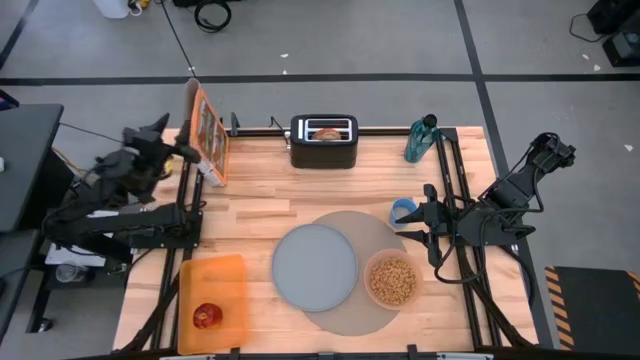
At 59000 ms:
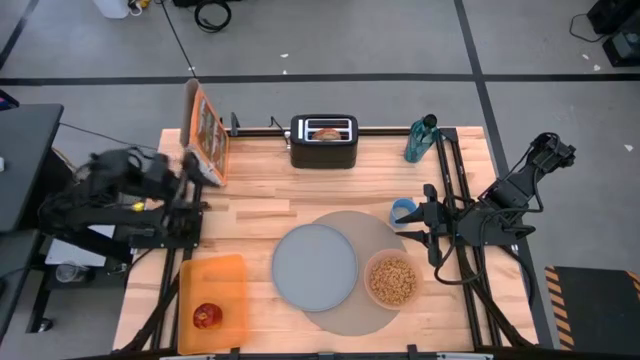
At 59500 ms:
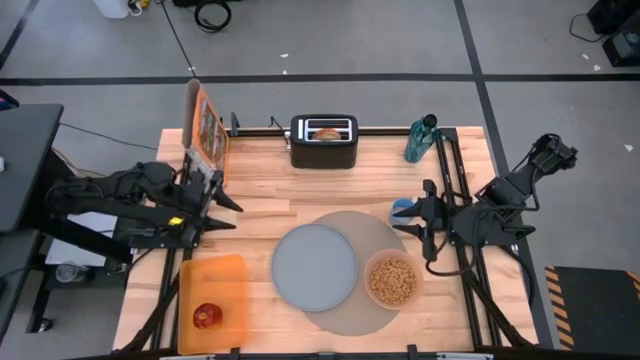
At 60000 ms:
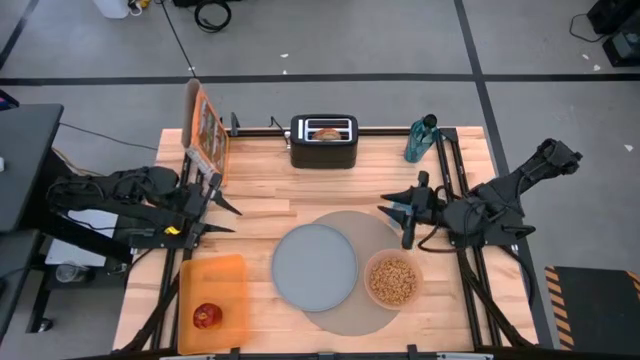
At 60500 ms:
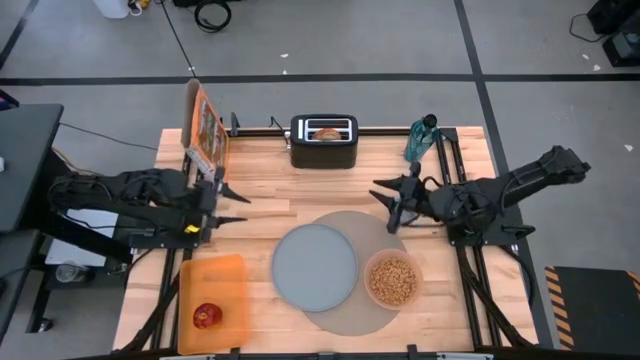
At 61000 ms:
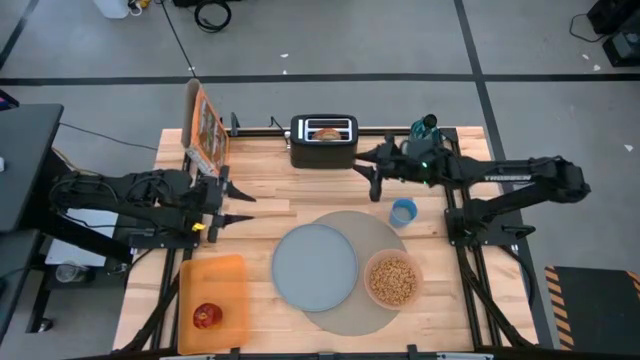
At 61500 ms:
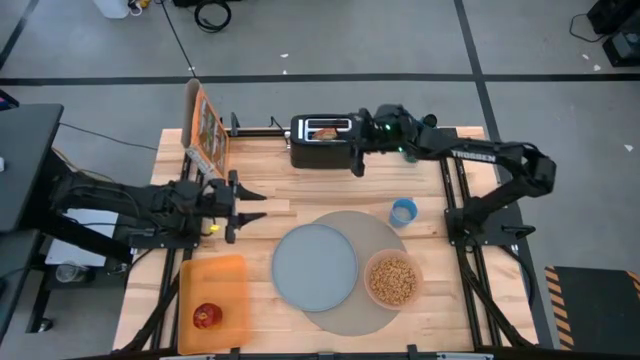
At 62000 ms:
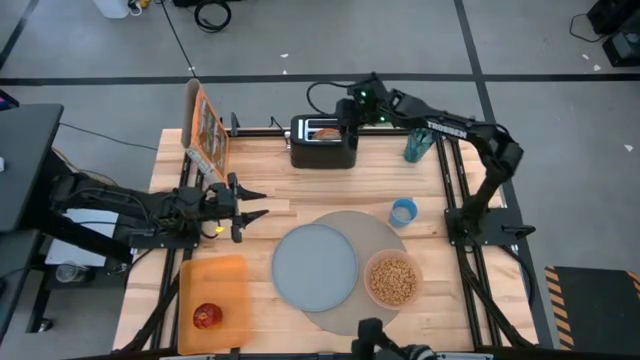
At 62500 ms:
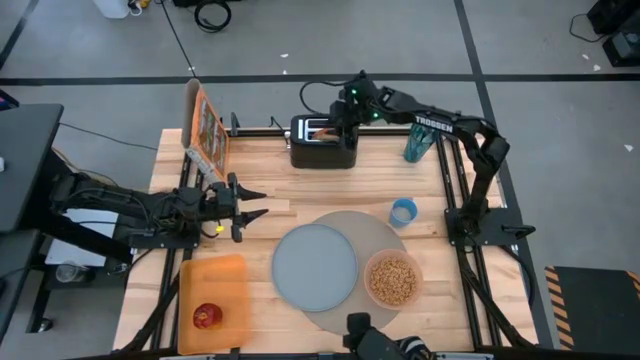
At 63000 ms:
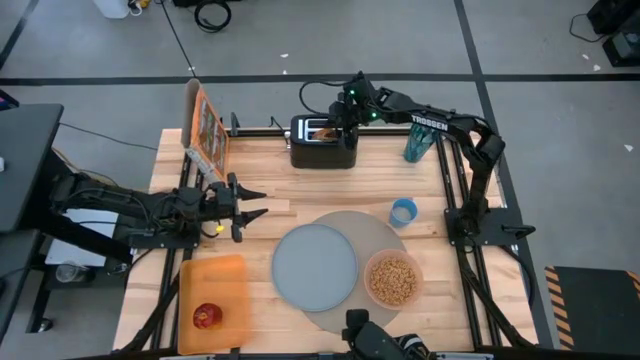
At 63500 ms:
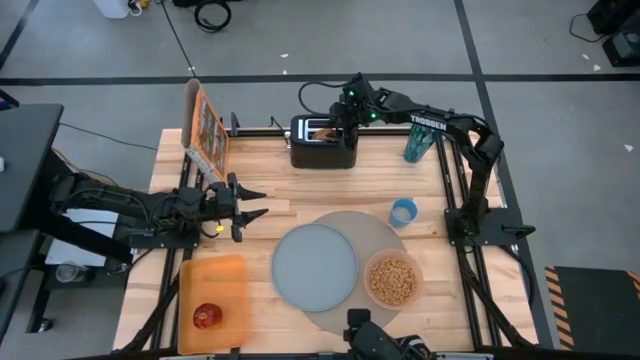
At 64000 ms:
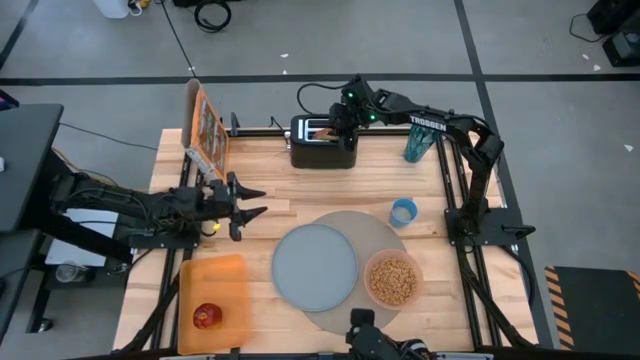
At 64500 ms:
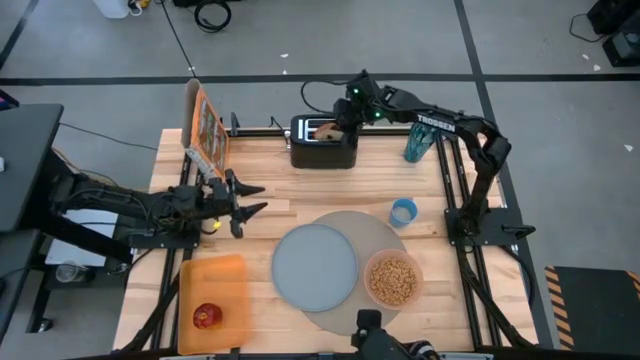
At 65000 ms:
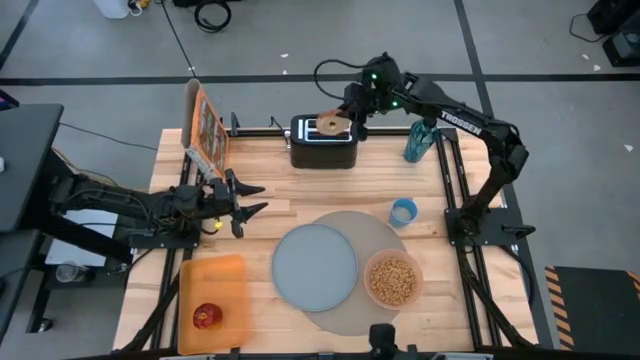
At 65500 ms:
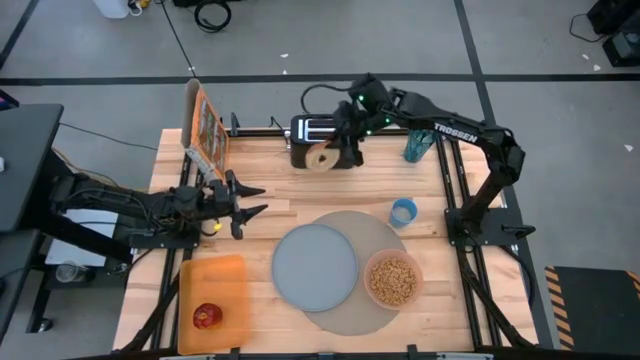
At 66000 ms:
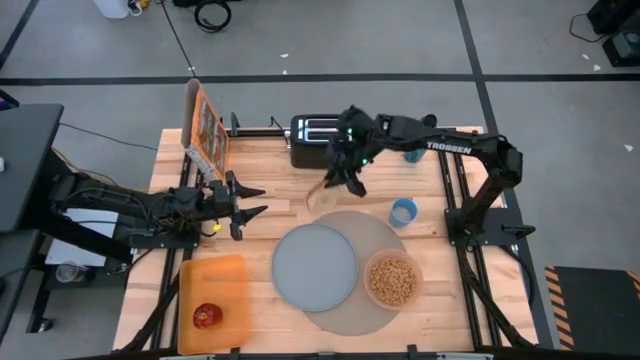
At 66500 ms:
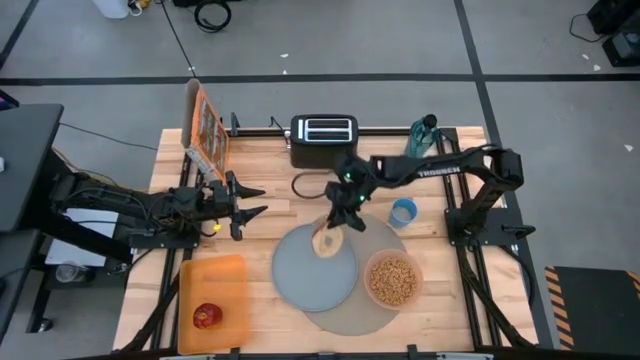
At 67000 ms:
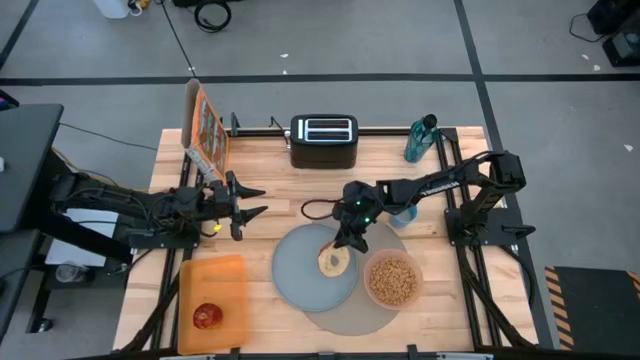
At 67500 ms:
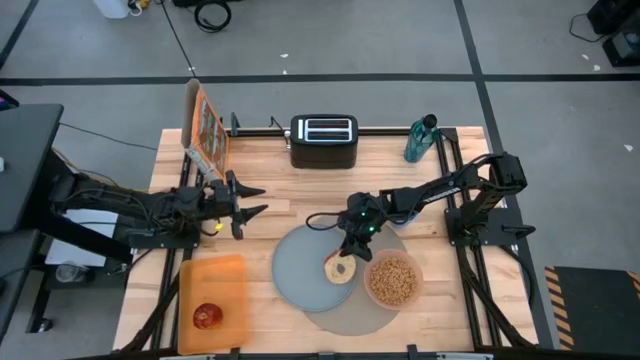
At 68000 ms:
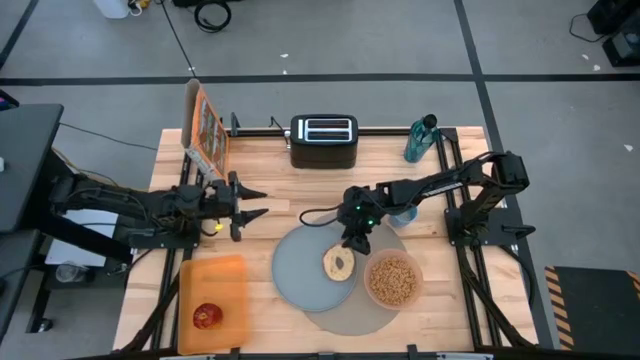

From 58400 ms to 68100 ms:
Task: Arrange a breakfast setting
Put the toasted bagel on the grey plate

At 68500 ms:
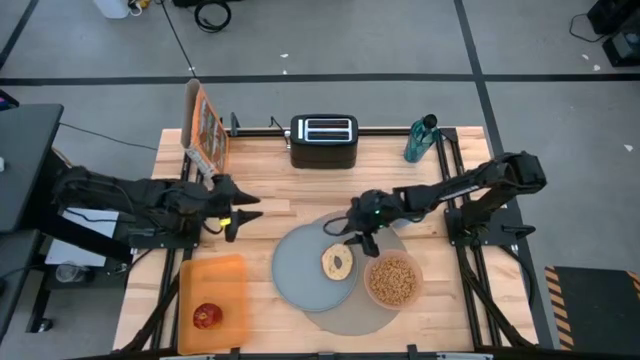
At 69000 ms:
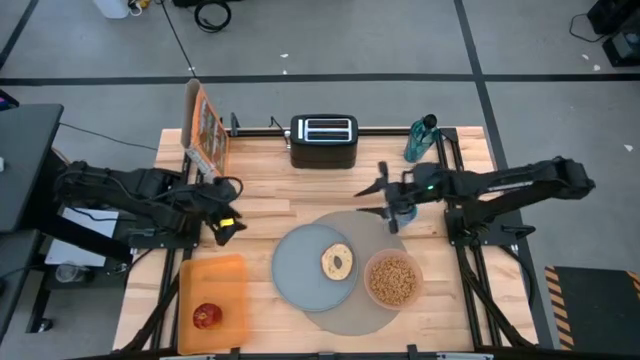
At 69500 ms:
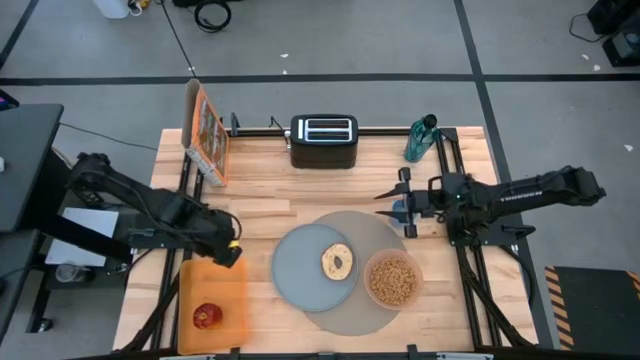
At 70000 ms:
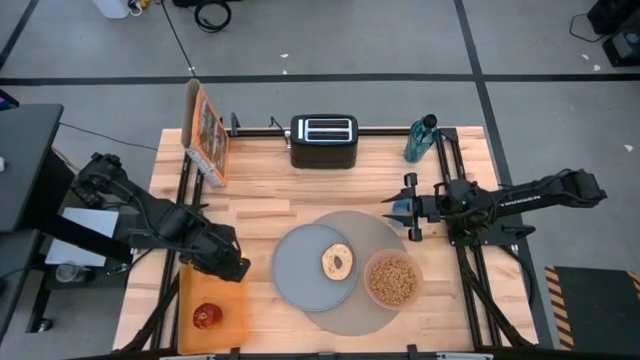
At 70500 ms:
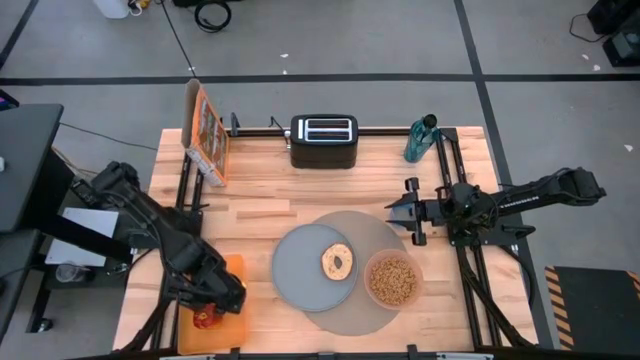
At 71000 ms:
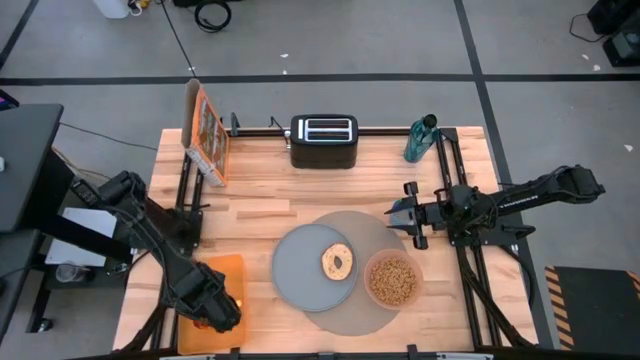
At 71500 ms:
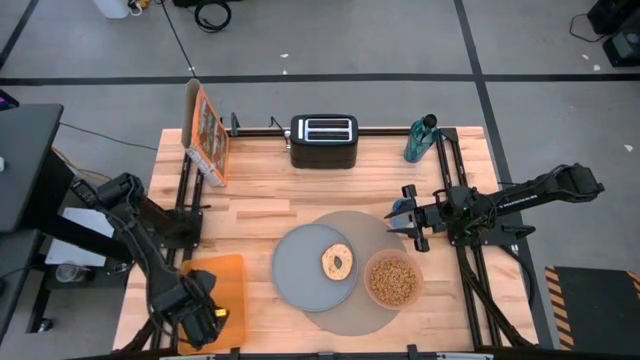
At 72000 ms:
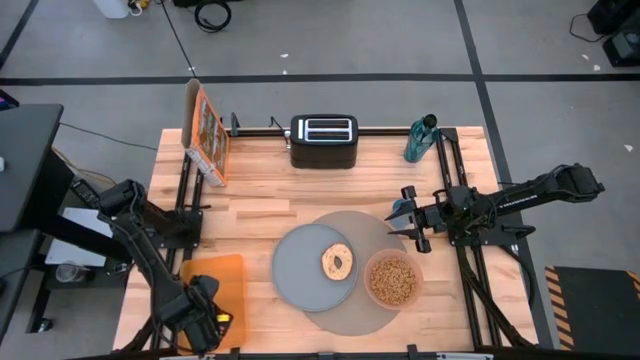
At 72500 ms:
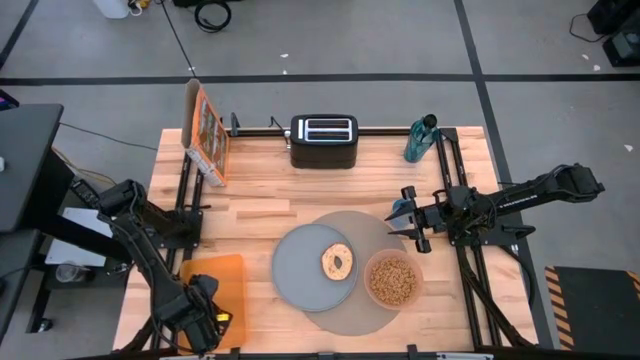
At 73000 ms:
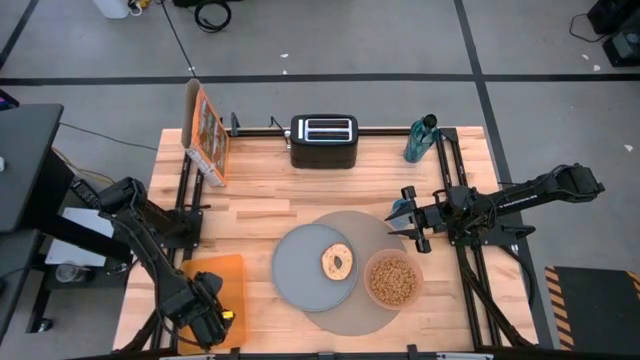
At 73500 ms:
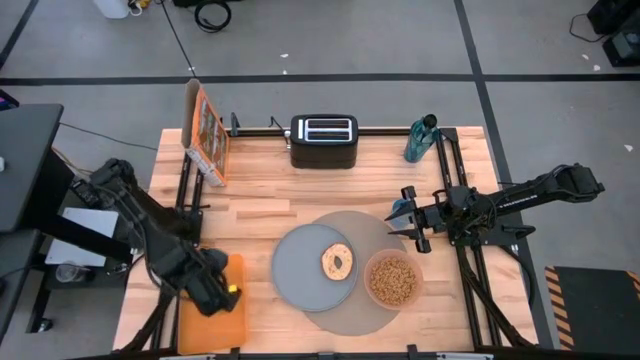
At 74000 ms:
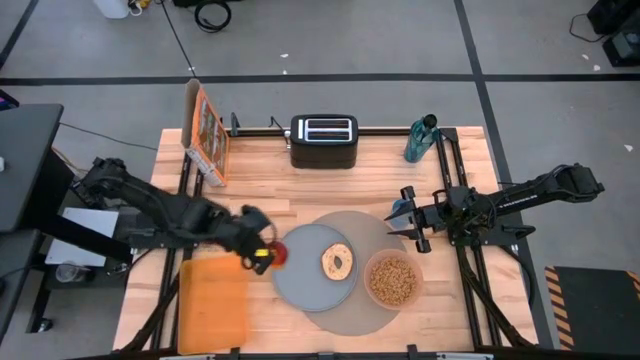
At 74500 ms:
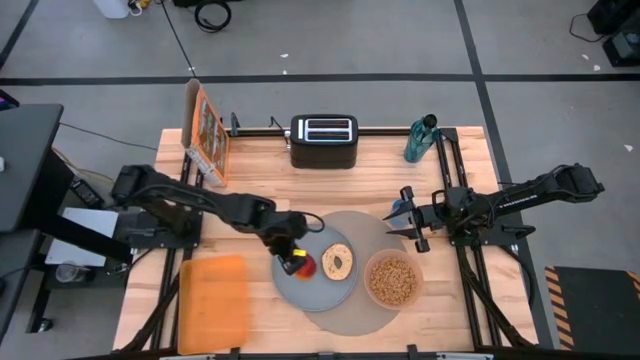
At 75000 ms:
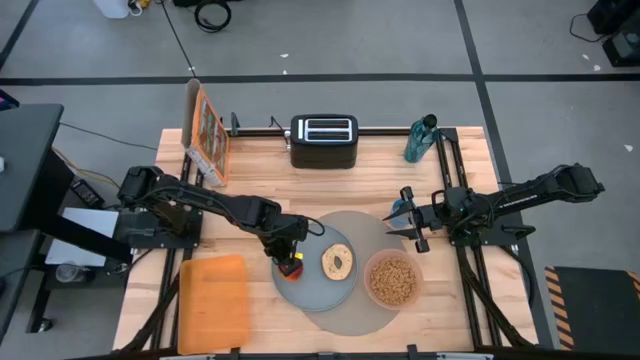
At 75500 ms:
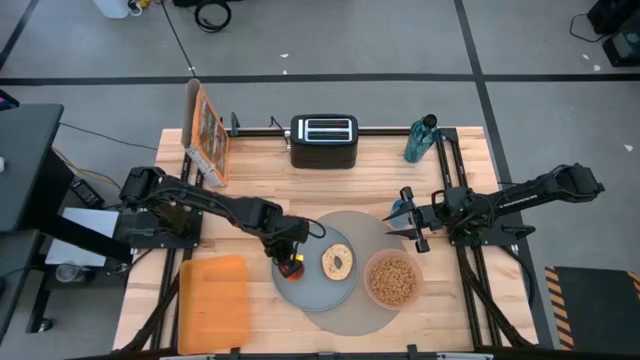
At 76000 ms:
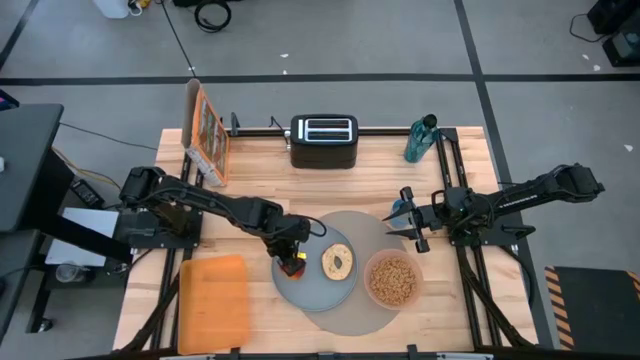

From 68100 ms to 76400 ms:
Put the apple on the grey plate to the left of the toasted bagel

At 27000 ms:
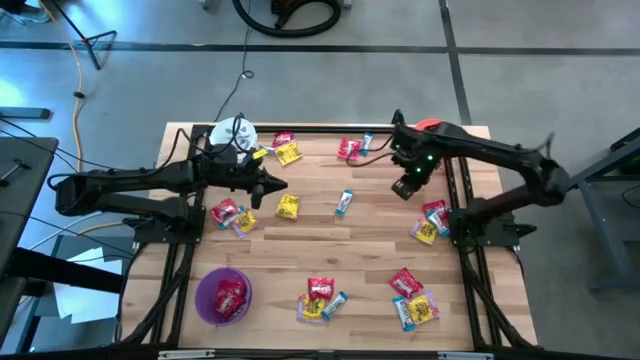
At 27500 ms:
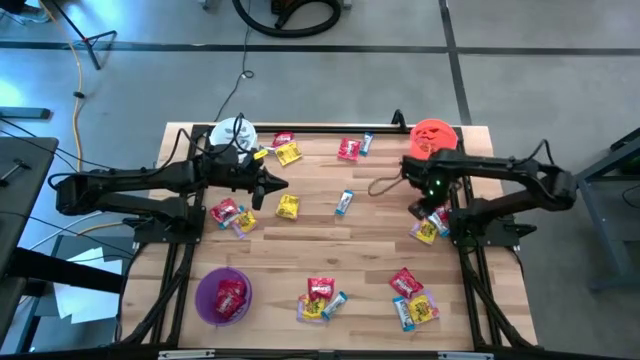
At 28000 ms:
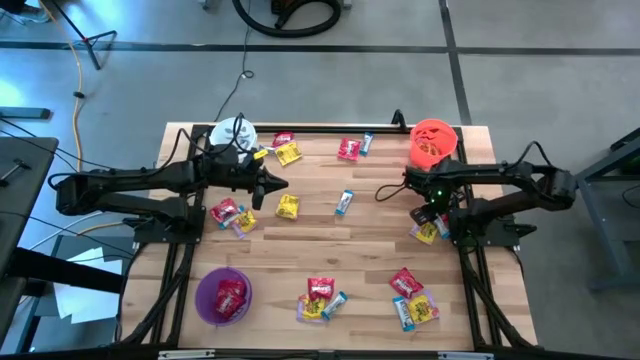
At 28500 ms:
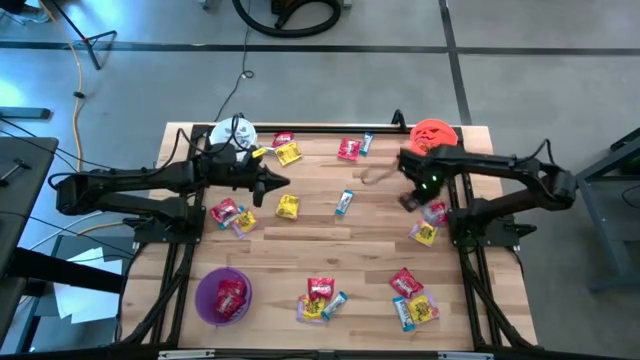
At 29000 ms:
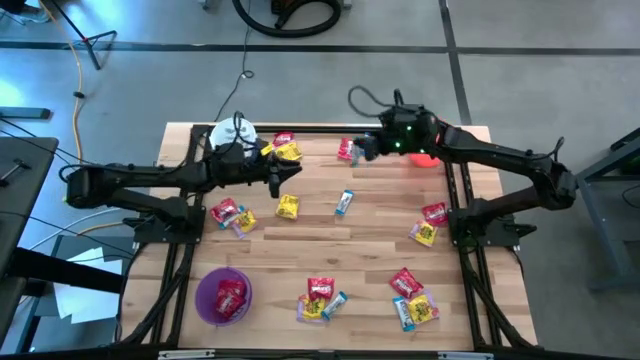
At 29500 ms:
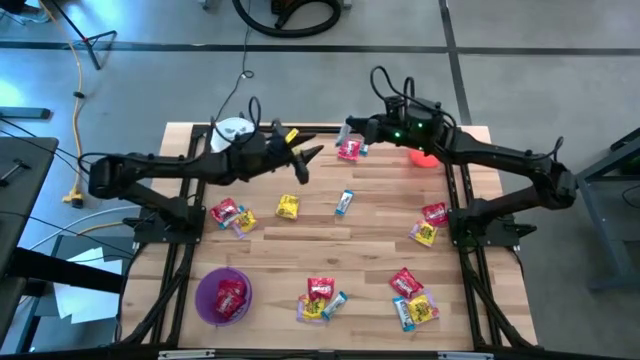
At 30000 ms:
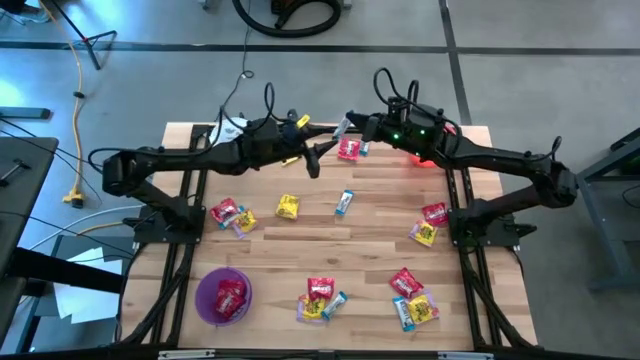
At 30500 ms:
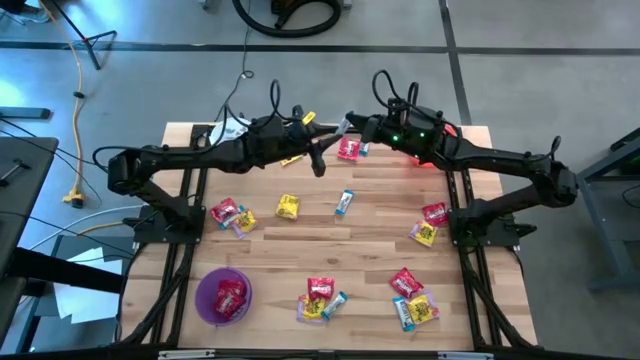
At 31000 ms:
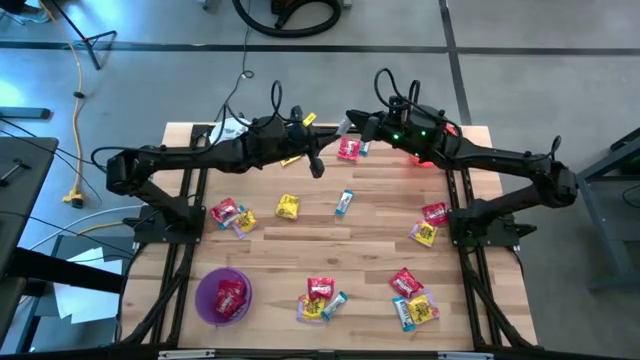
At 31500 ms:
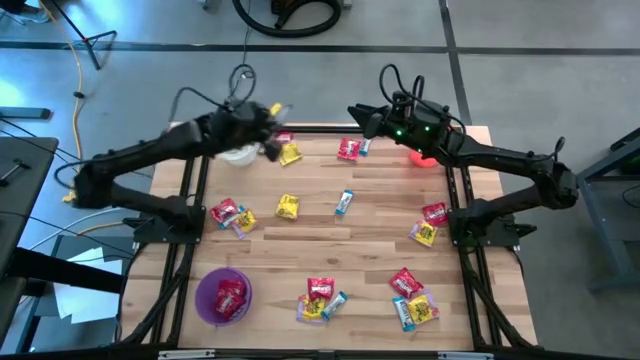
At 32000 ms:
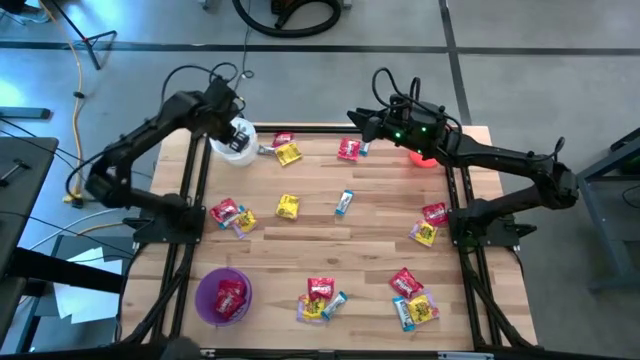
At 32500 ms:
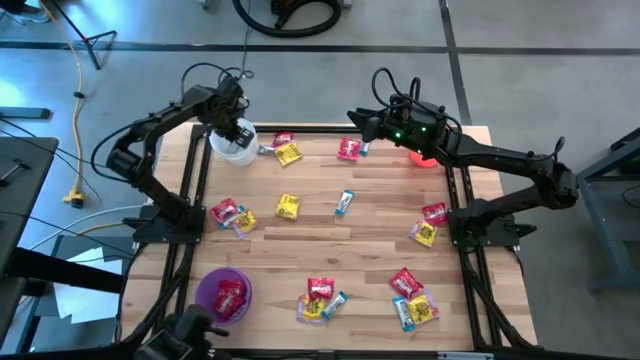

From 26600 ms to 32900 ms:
Task: Sort candy
Put the white candy into the white bucket
